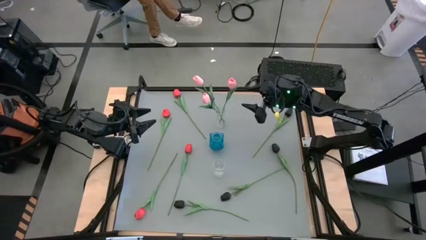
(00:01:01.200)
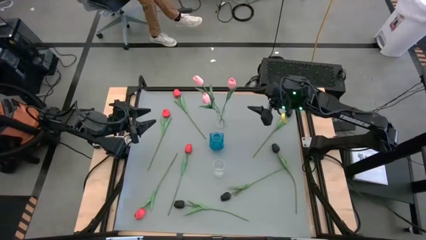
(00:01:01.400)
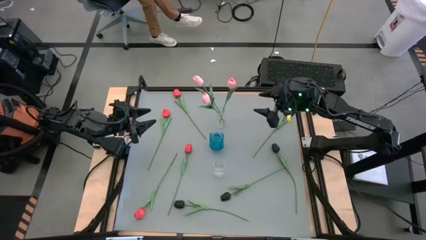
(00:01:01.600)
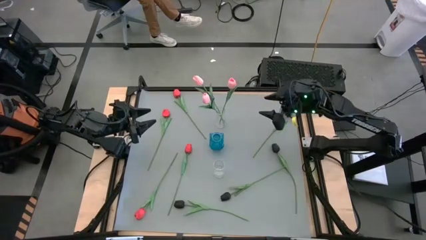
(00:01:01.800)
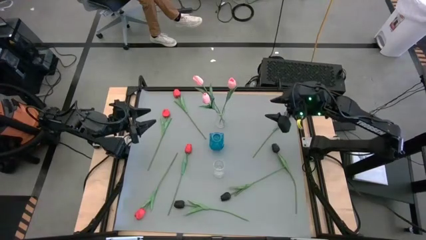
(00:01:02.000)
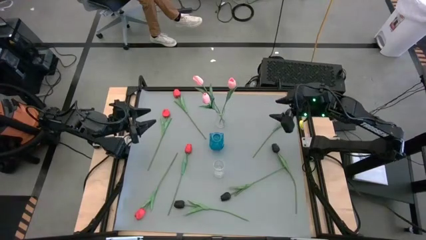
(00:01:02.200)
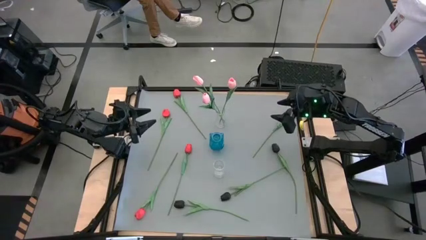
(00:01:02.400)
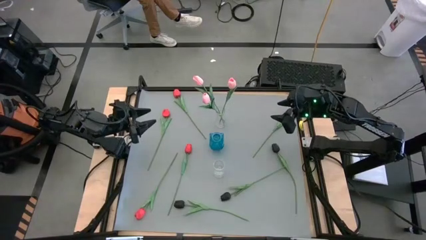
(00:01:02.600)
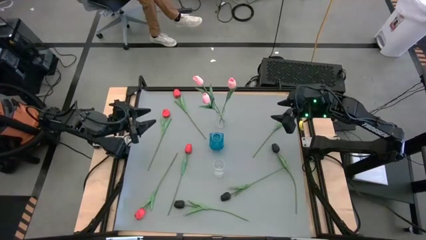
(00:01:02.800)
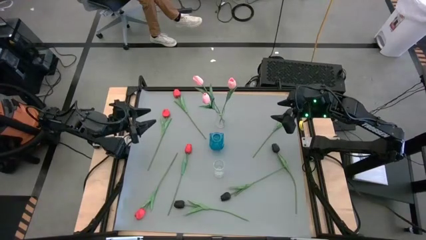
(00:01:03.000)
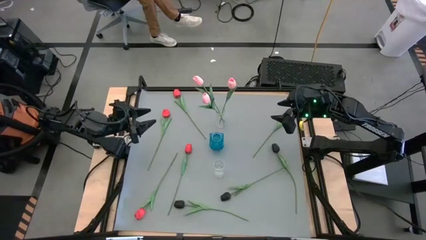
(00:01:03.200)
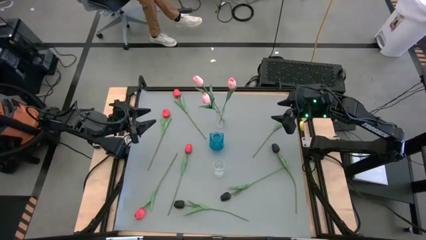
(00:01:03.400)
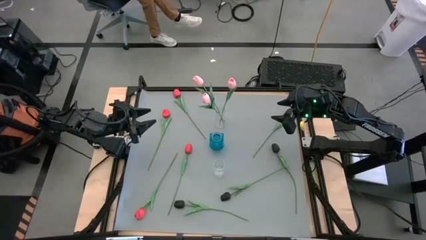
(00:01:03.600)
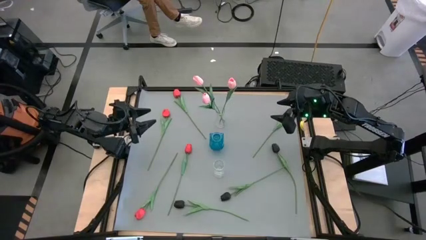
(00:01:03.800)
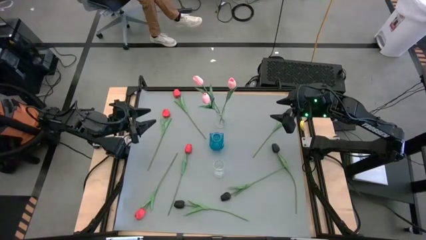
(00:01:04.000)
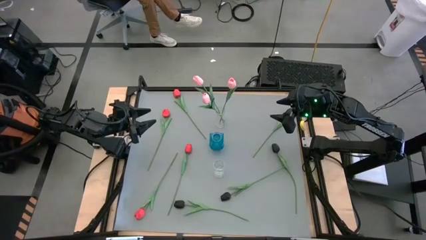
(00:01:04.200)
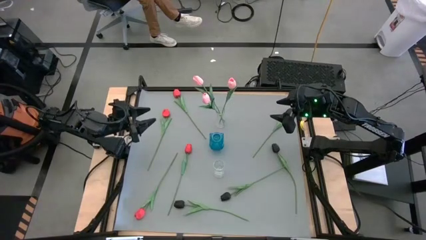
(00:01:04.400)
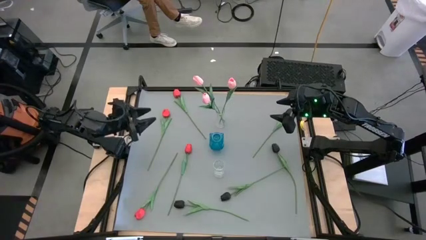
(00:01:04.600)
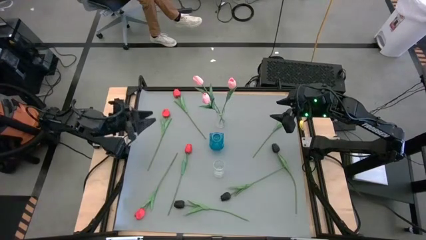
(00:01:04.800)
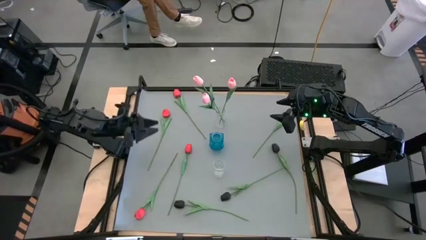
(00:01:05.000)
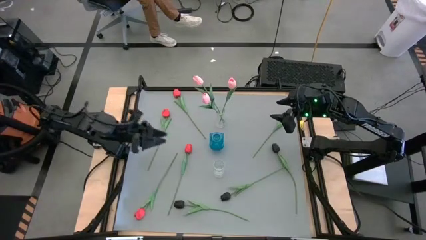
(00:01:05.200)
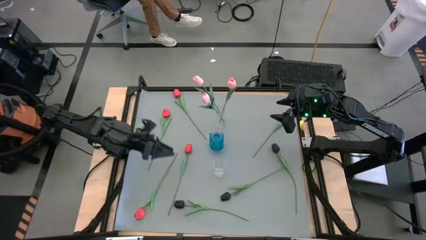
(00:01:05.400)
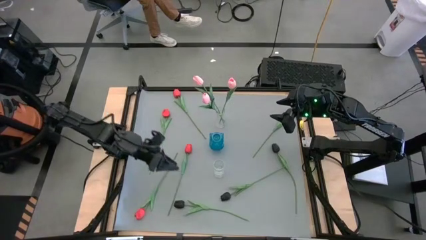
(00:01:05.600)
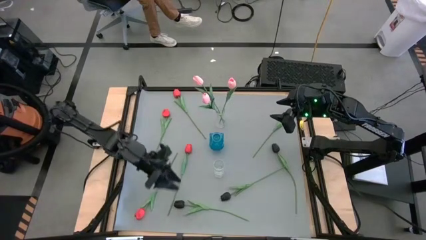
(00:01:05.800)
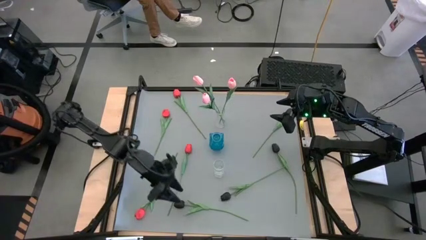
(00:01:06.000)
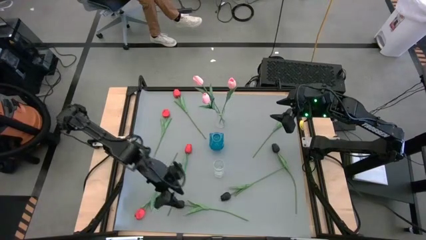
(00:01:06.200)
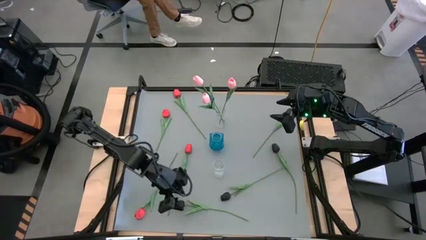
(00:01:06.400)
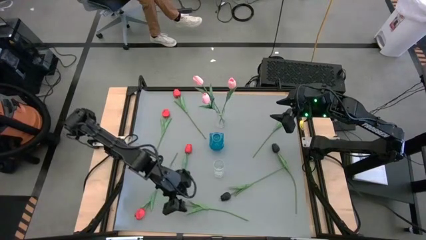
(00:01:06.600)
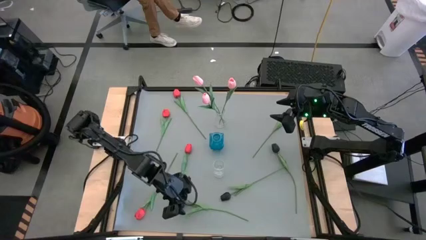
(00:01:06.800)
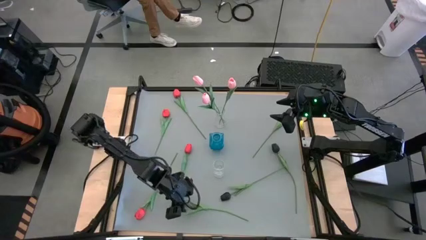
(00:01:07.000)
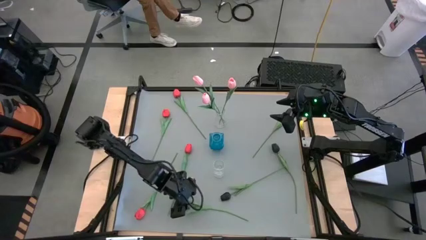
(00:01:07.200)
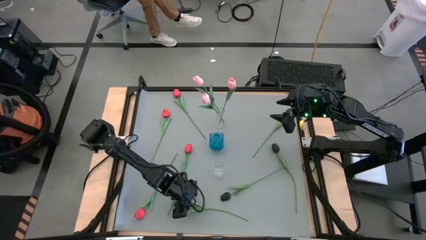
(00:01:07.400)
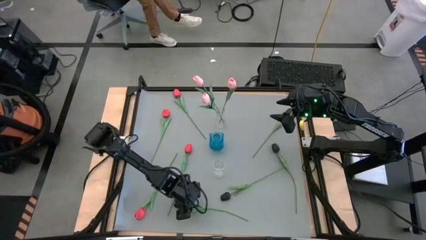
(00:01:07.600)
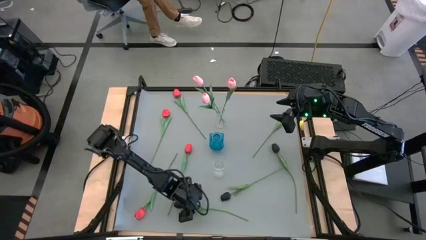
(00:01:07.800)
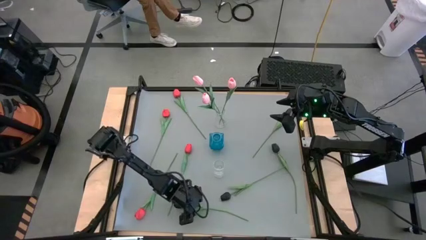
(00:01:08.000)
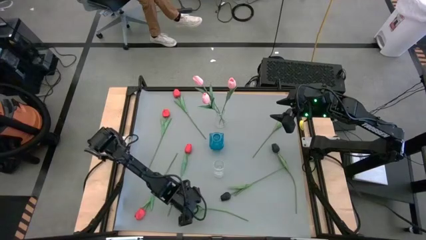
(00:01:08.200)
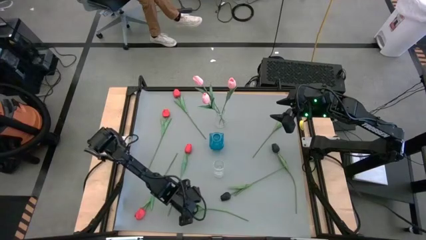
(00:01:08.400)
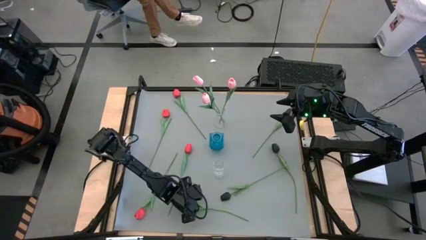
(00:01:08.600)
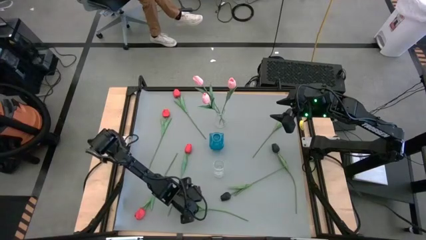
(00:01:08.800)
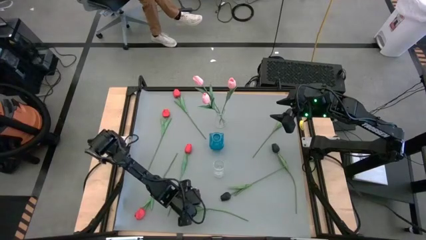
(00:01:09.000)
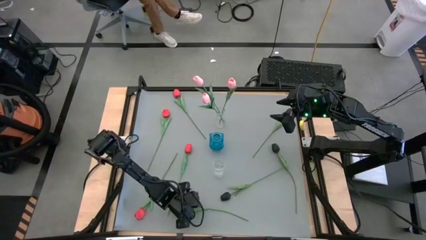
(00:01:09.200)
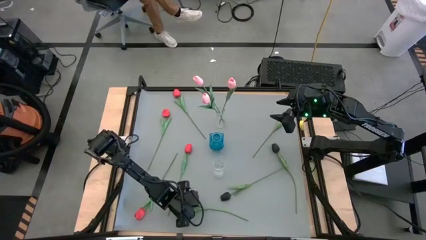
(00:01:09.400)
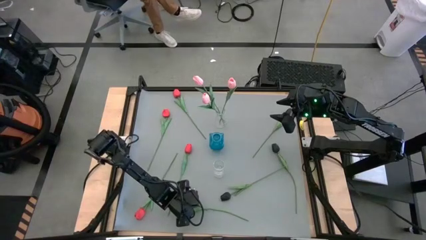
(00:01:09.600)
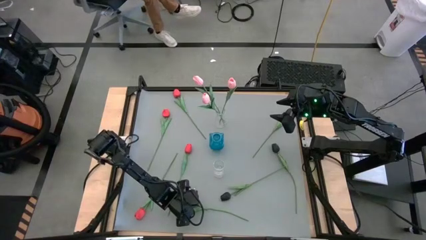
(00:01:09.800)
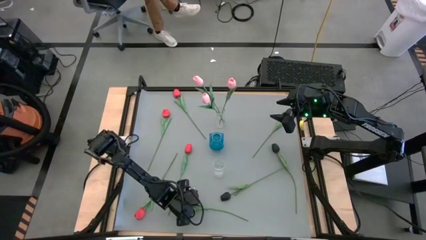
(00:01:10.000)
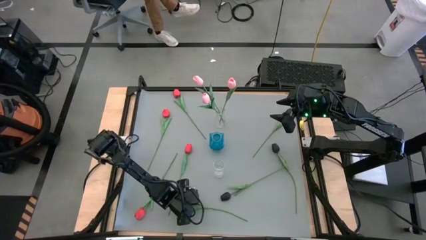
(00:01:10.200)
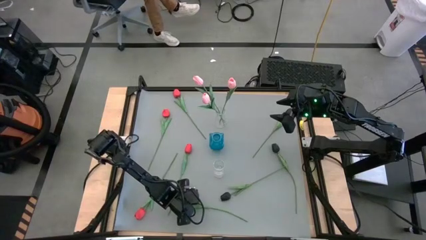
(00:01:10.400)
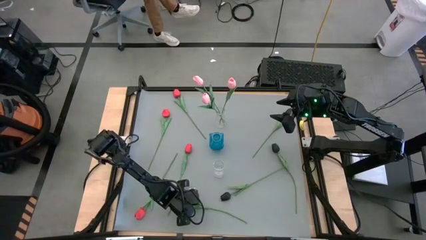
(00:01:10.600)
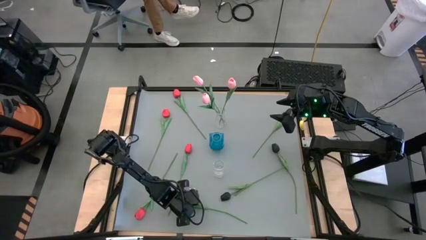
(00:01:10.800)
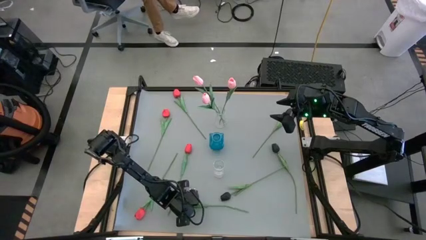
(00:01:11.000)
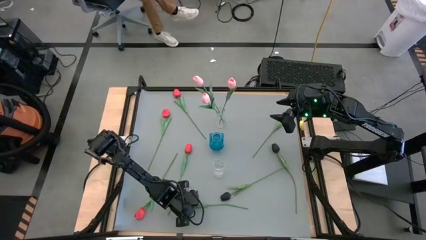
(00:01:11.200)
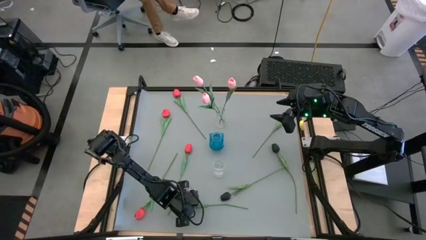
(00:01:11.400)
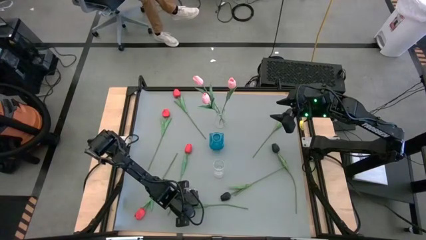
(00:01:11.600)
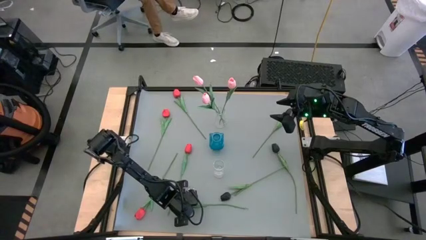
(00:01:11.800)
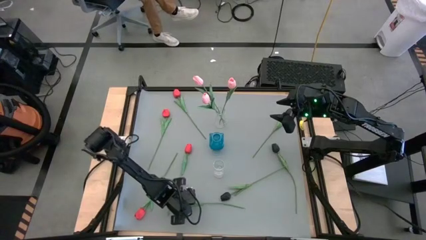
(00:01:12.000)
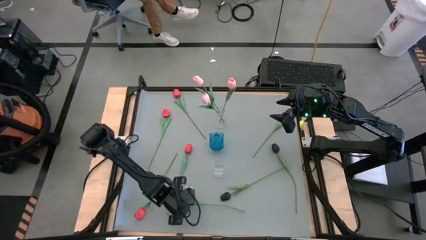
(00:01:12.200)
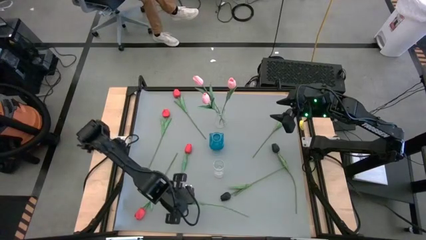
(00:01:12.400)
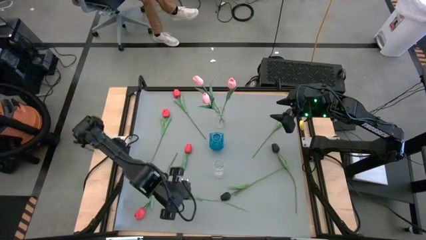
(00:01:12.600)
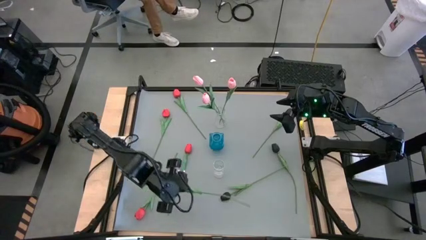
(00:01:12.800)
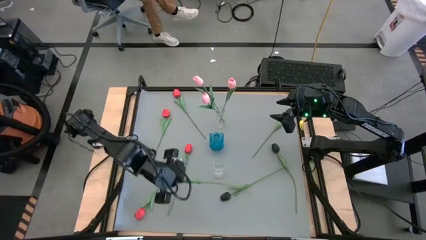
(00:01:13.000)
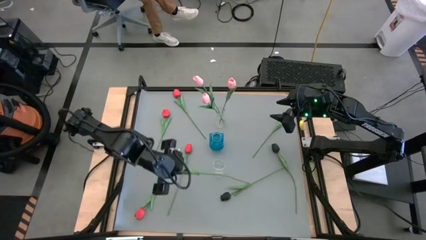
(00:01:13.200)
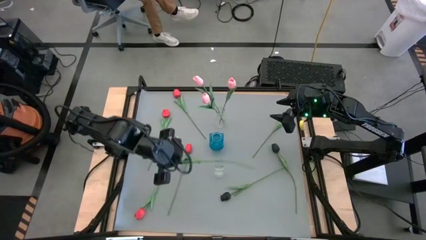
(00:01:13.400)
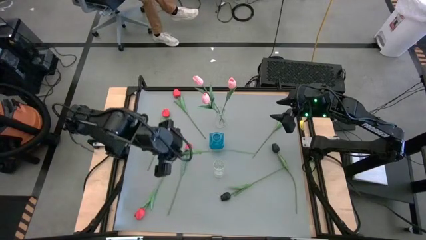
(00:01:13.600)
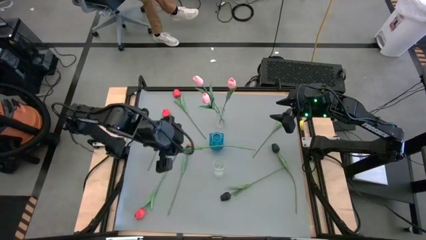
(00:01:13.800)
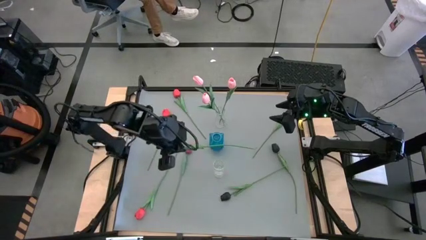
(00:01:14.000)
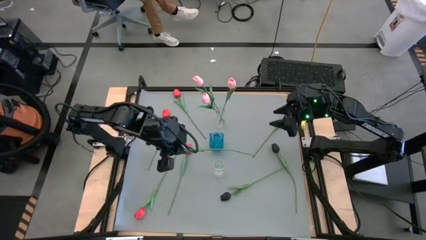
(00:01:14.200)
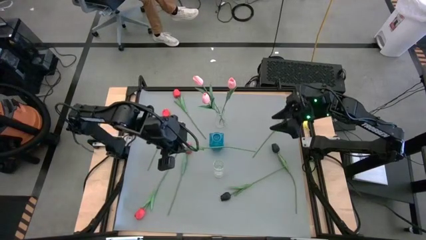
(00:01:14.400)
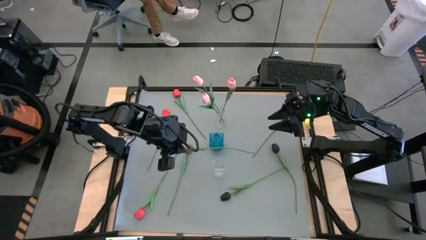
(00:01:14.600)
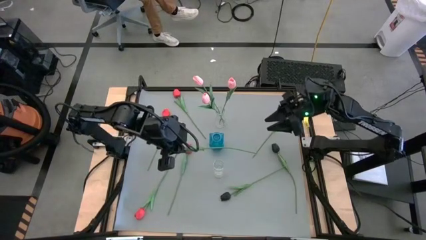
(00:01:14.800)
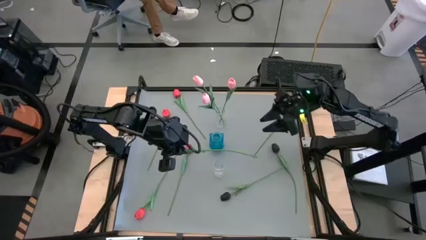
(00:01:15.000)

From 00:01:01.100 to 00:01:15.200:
Task: Sort flowers into vase by color
Put the bottom left black tulip into the blue vase
